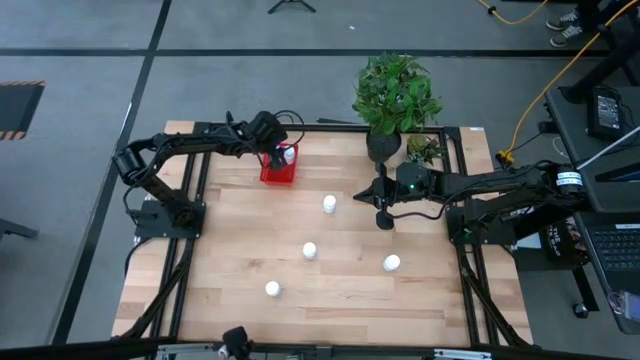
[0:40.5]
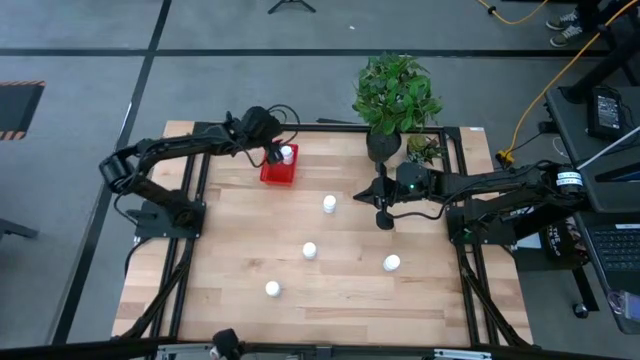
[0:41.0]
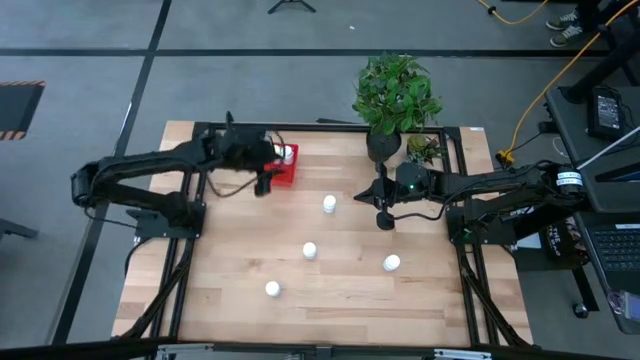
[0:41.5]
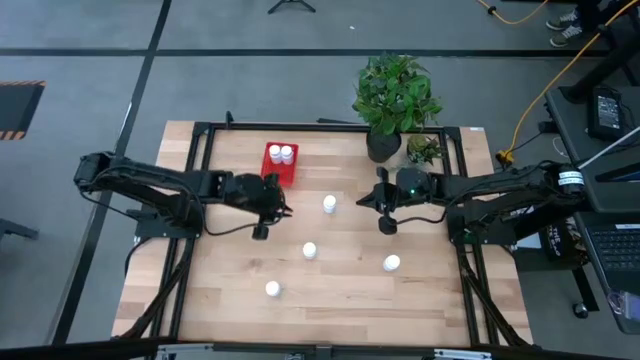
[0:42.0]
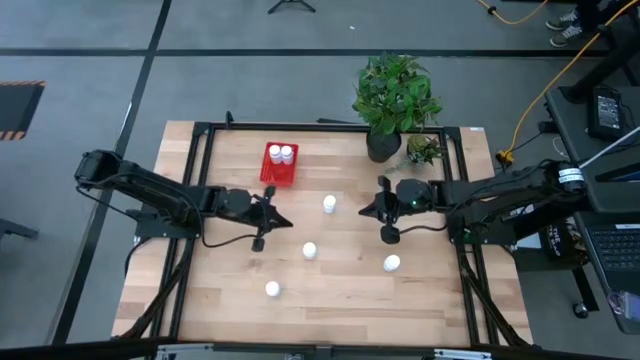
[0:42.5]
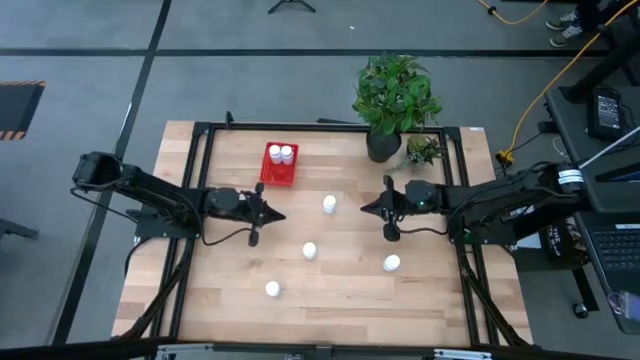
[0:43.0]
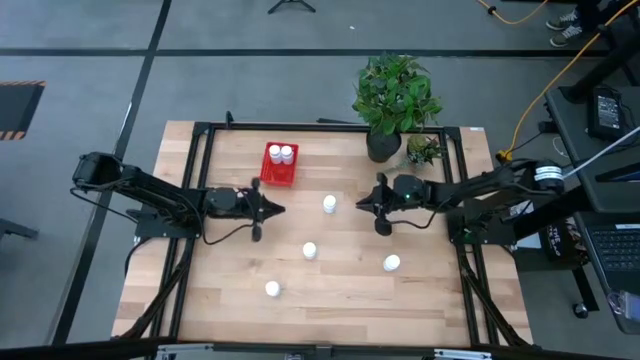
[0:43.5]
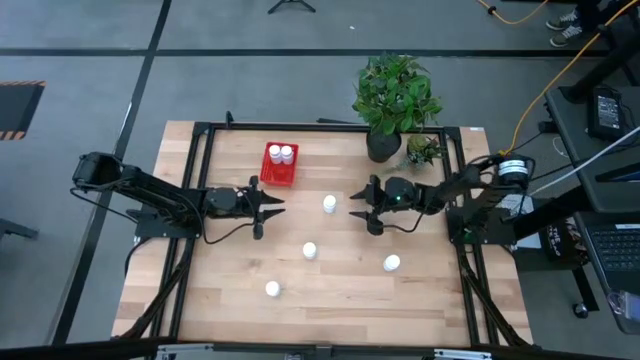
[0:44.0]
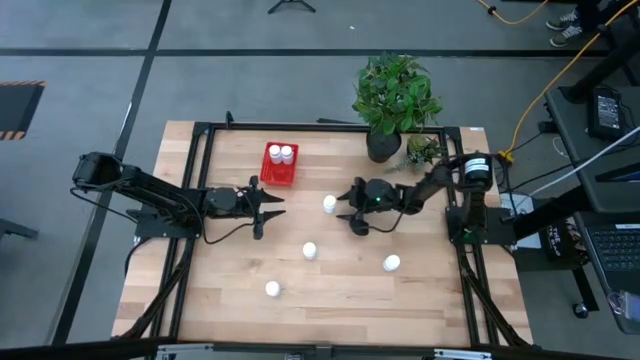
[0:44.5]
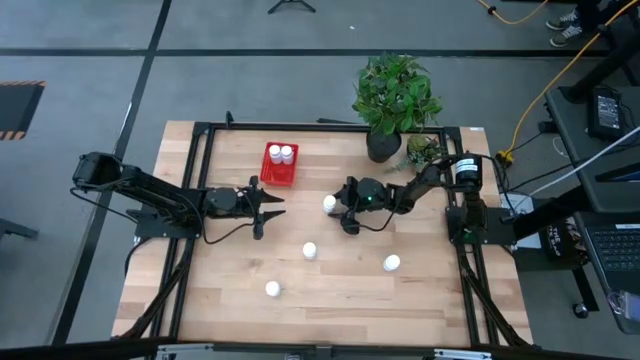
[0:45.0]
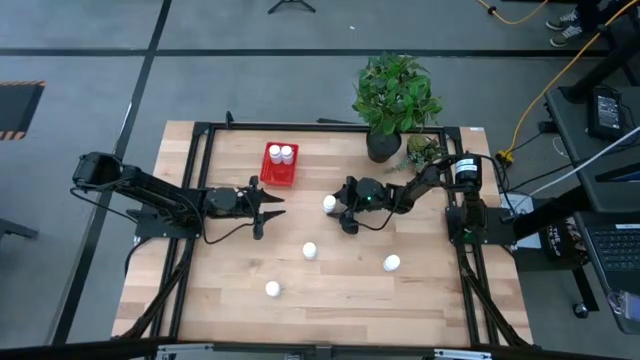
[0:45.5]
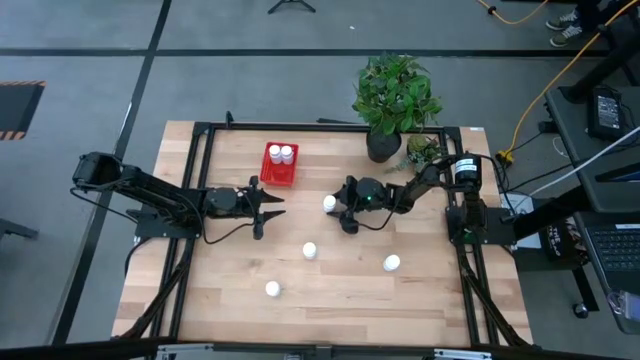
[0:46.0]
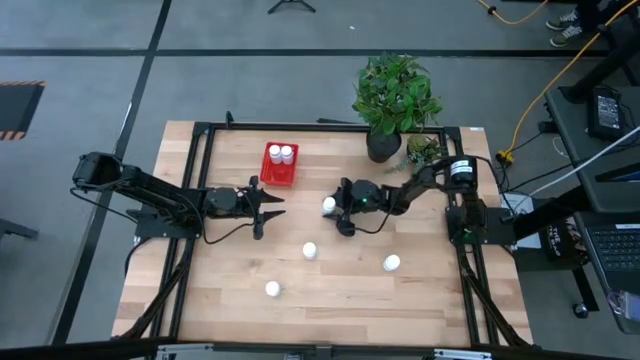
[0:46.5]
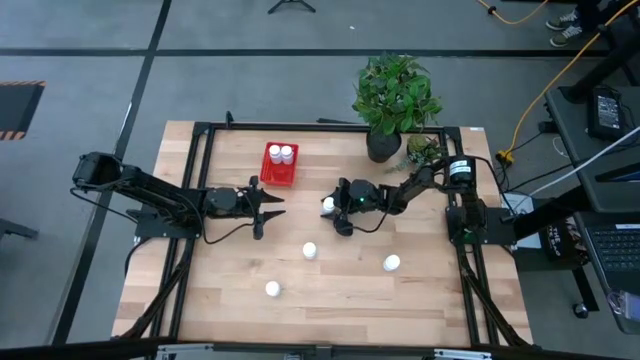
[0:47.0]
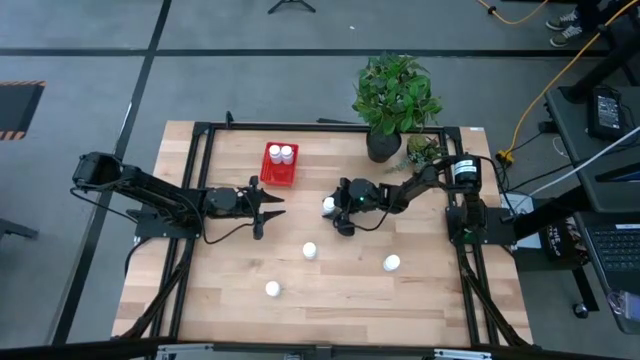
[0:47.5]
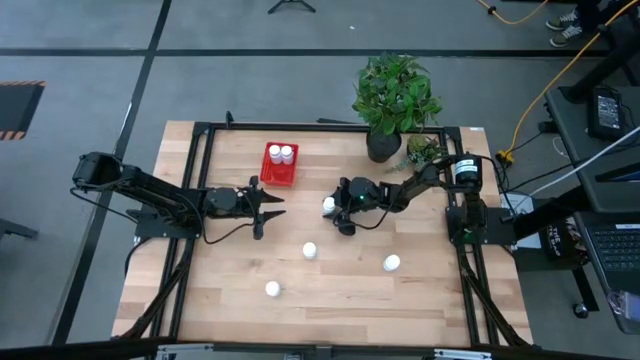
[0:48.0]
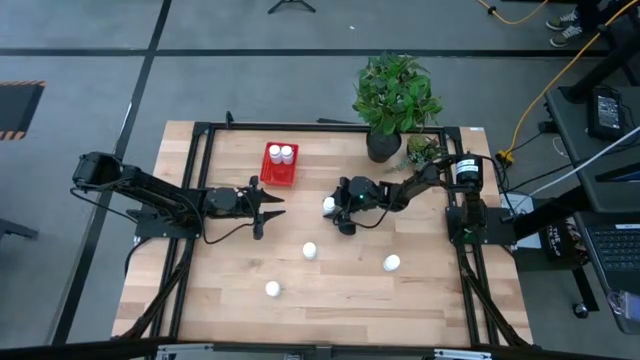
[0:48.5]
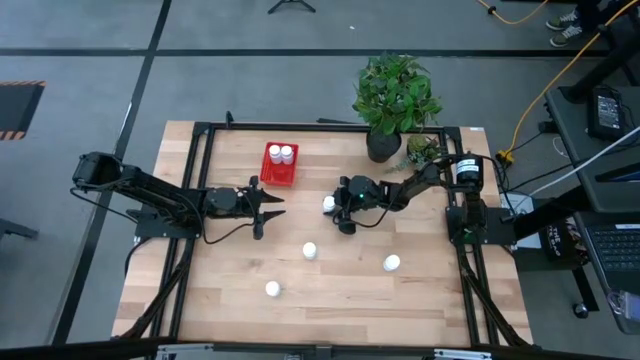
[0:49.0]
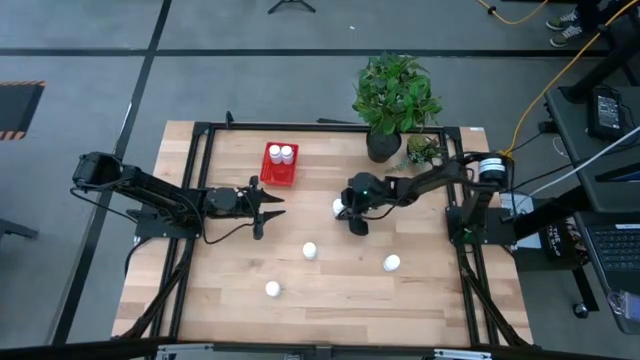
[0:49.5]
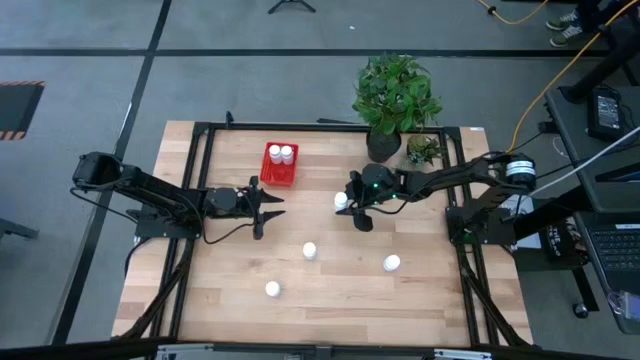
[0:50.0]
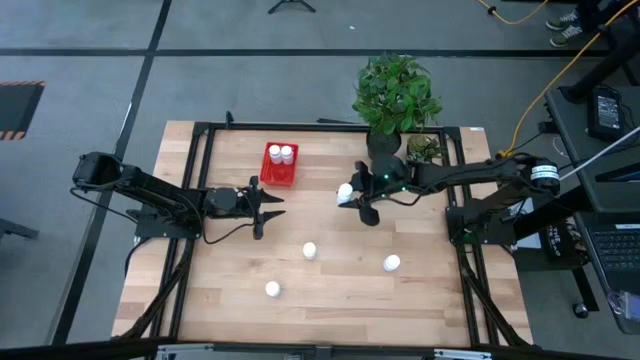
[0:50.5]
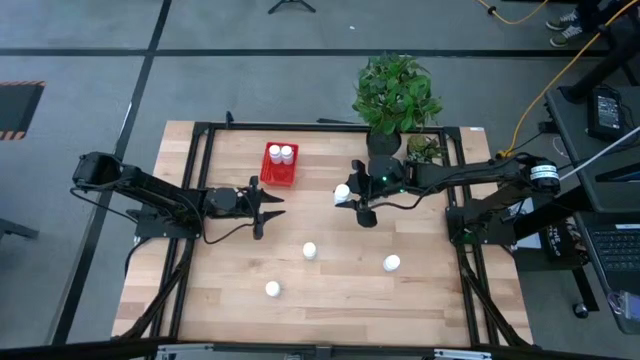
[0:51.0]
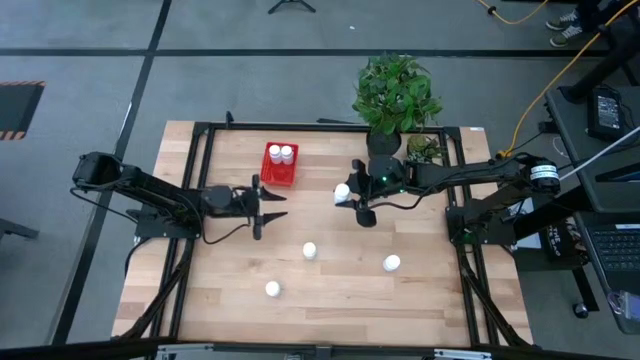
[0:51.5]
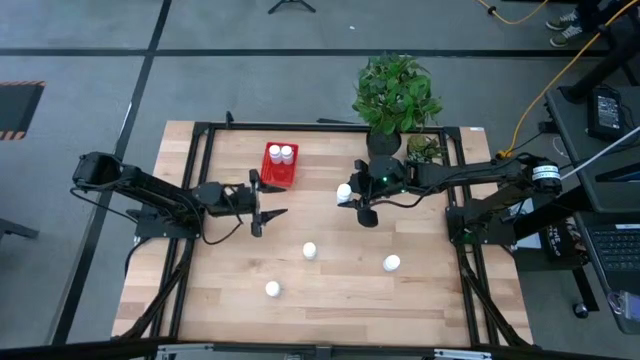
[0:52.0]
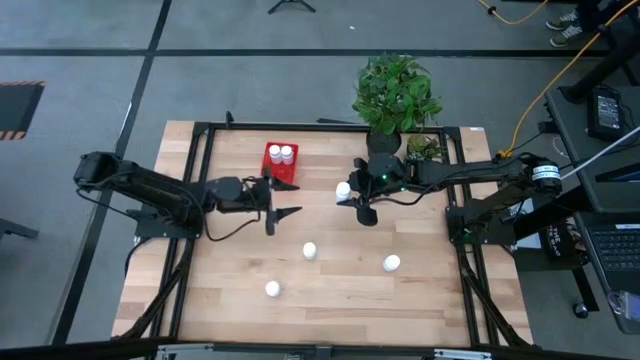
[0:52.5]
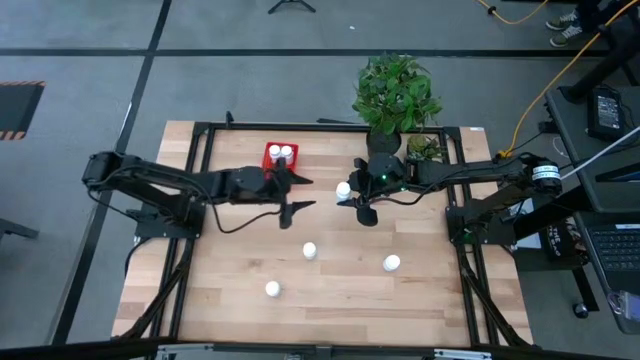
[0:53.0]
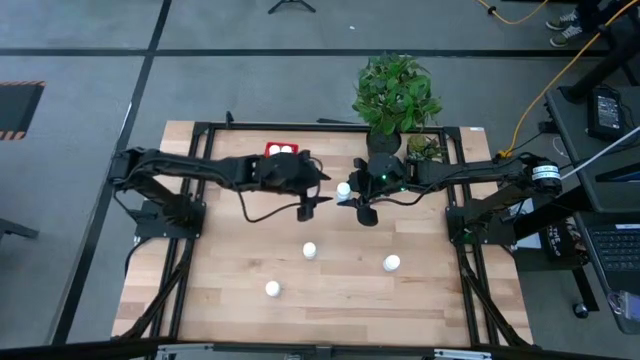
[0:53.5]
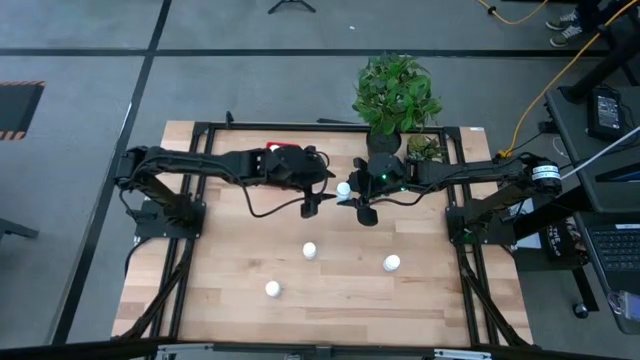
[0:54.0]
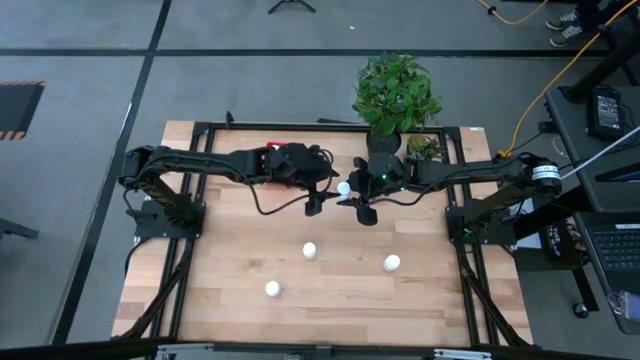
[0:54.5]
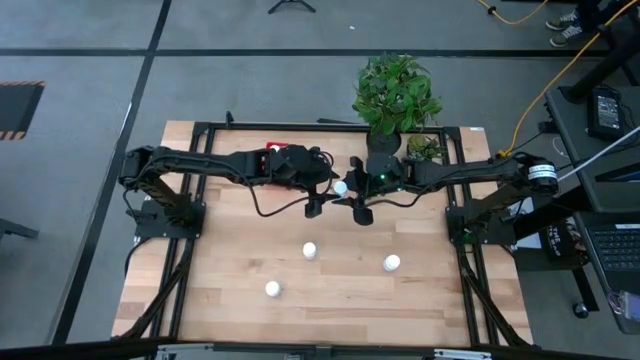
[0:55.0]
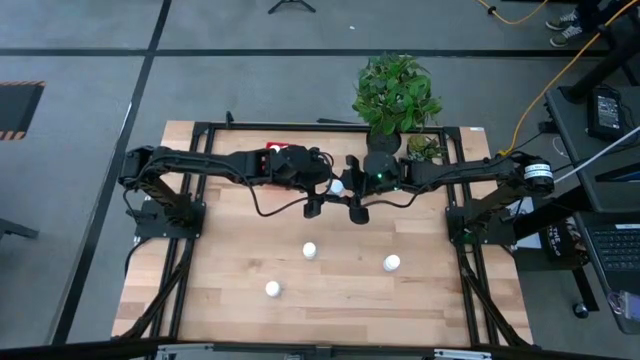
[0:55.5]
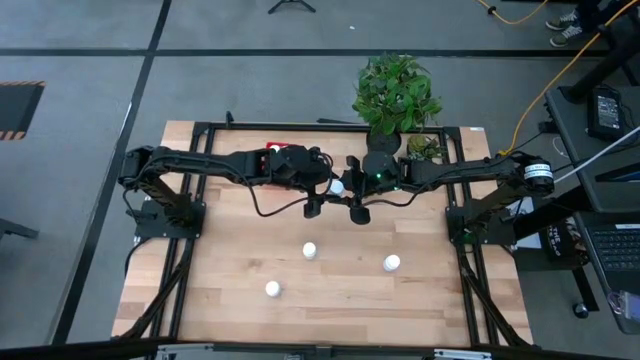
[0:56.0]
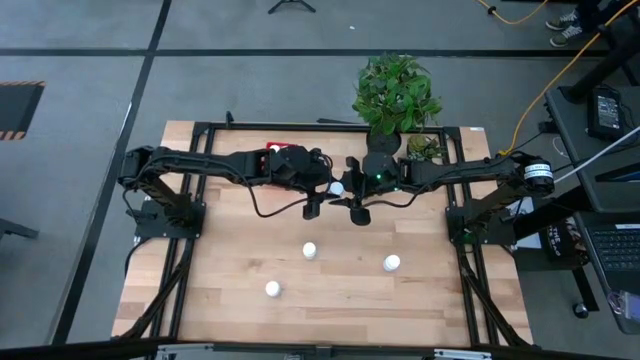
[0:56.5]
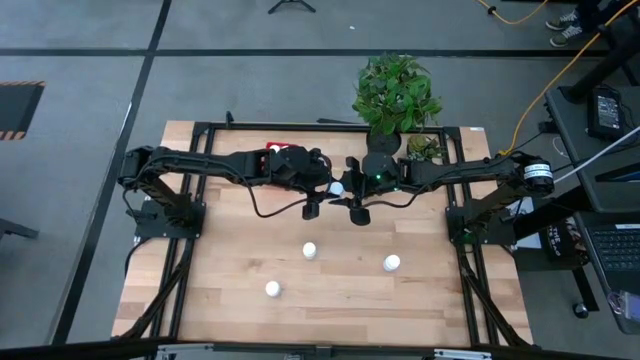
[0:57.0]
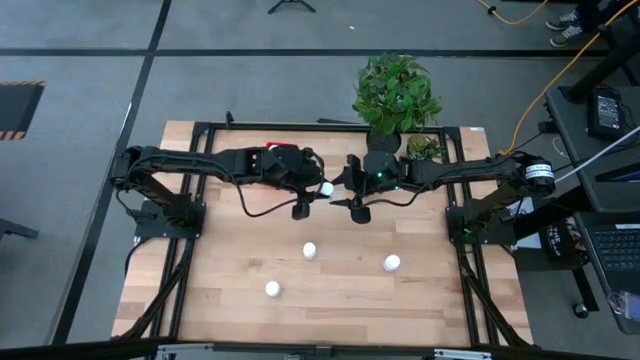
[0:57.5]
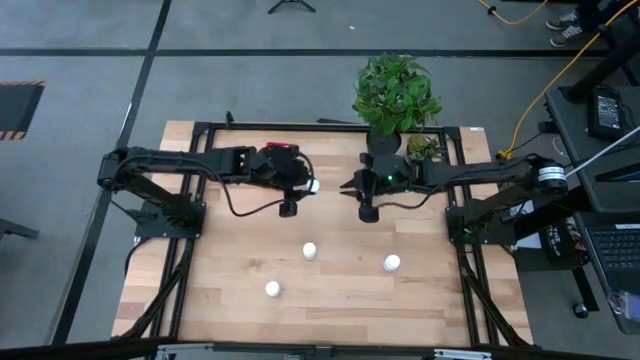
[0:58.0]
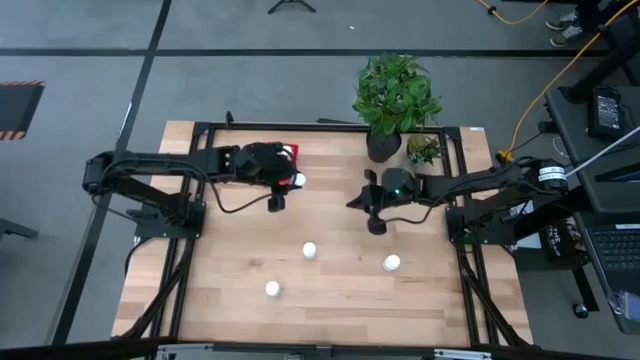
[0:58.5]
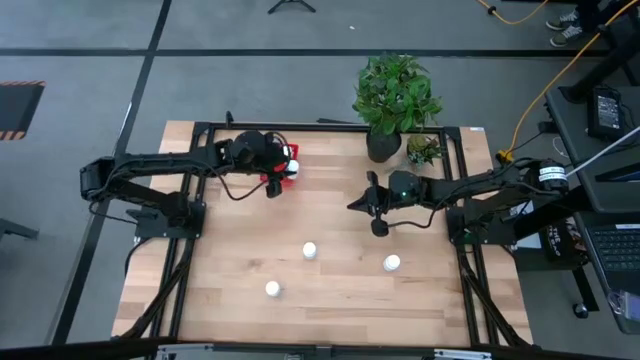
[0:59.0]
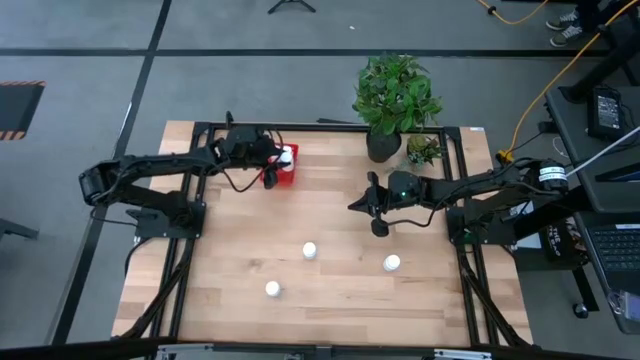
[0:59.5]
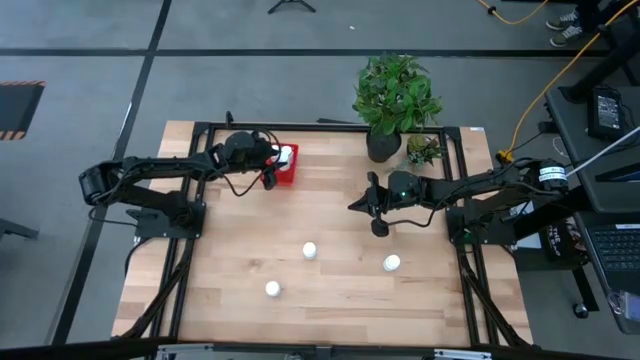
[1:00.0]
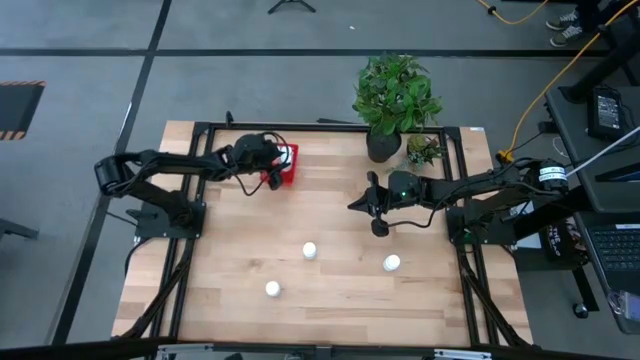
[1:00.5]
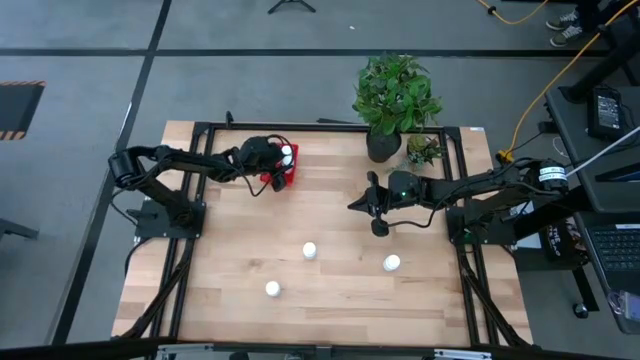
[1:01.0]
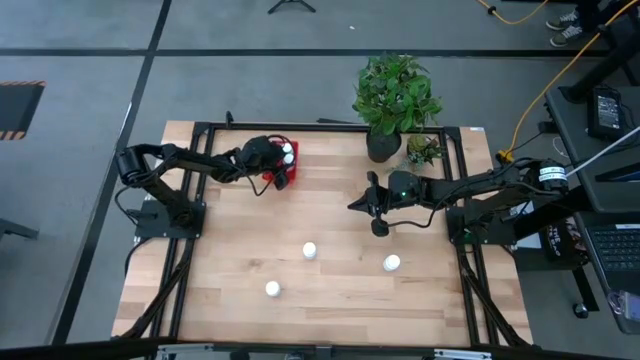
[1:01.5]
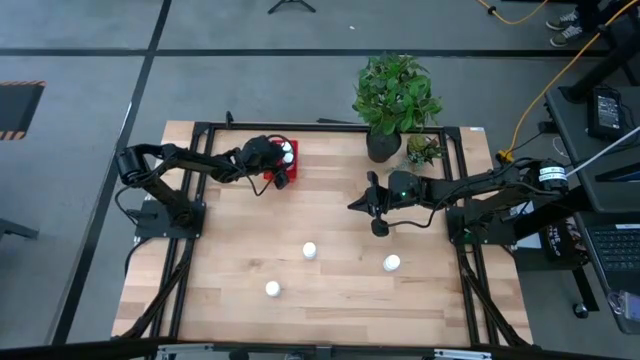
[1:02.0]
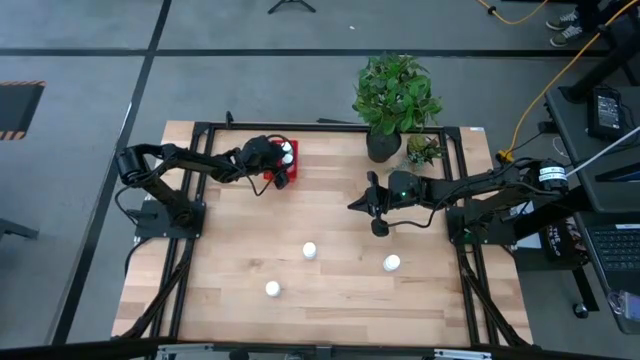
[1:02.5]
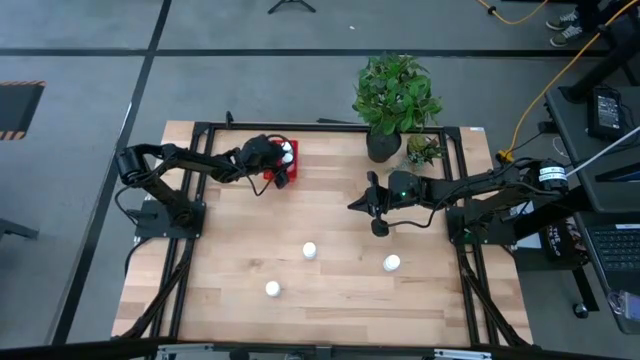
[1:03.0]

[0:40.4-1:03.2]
Task: Pick and place pill bottles into a basket
Put the white pill bottle into the red bin
